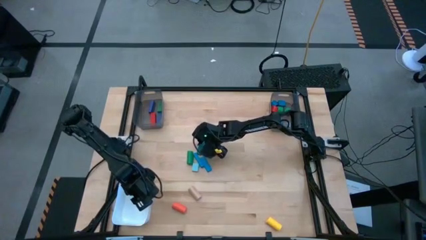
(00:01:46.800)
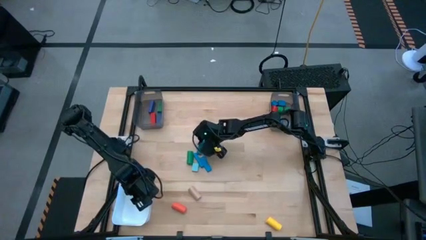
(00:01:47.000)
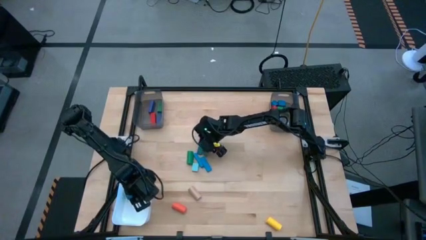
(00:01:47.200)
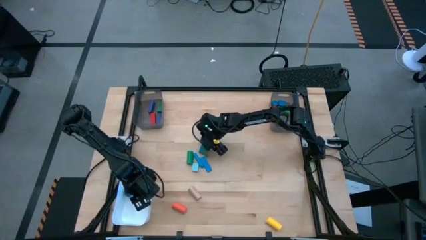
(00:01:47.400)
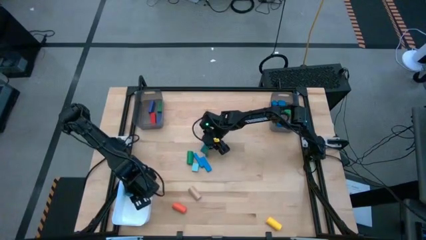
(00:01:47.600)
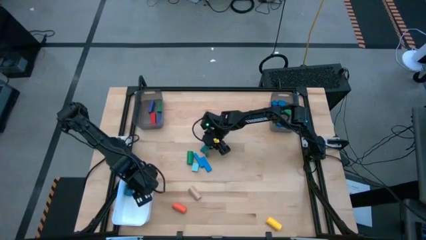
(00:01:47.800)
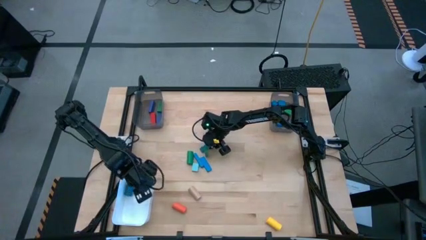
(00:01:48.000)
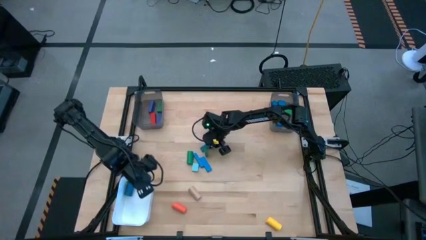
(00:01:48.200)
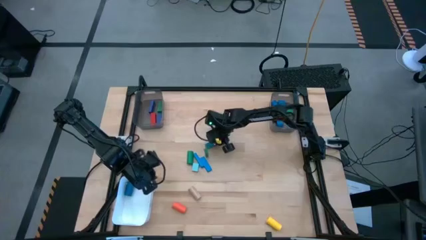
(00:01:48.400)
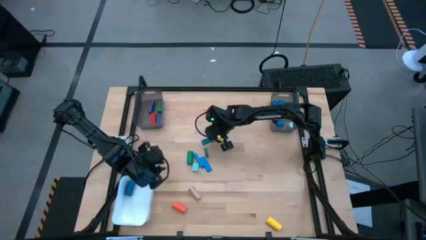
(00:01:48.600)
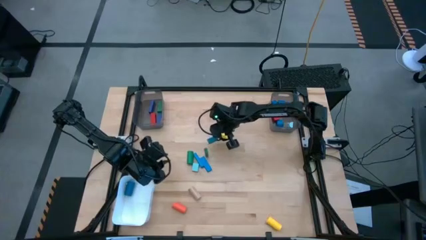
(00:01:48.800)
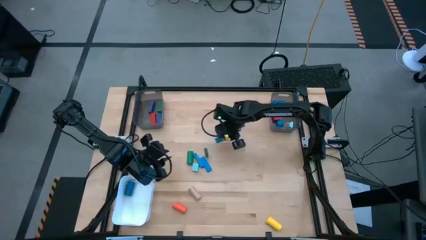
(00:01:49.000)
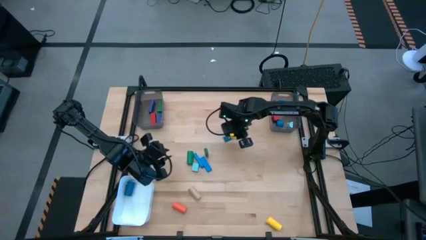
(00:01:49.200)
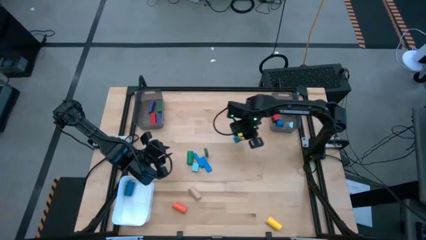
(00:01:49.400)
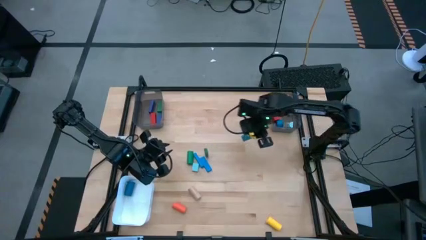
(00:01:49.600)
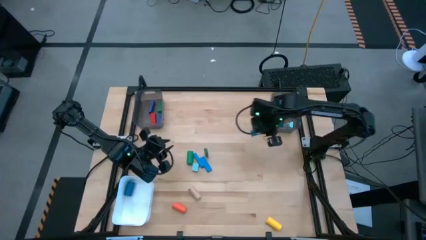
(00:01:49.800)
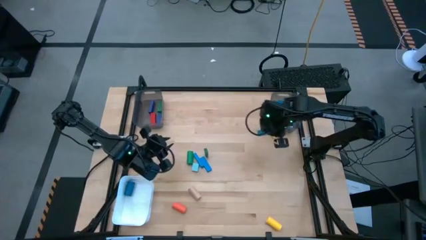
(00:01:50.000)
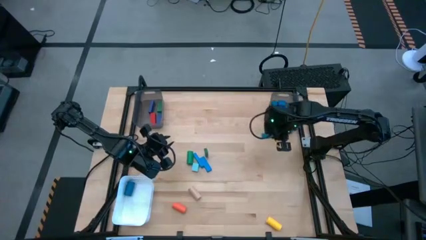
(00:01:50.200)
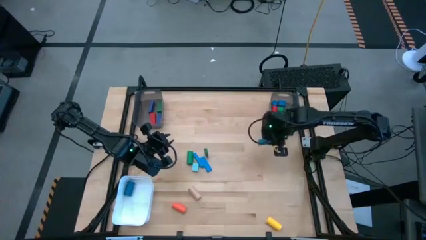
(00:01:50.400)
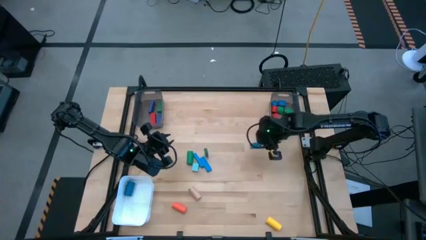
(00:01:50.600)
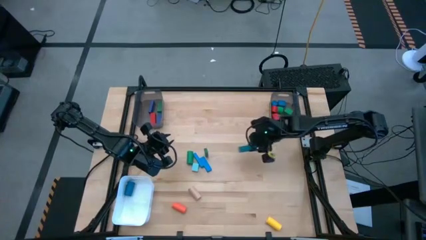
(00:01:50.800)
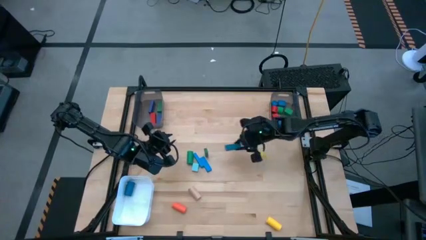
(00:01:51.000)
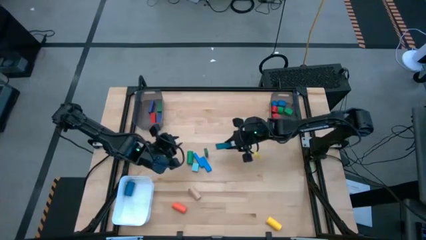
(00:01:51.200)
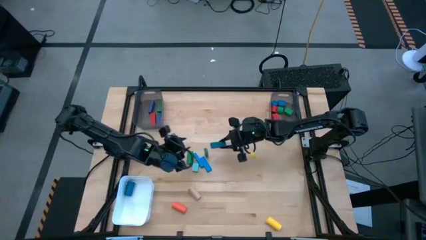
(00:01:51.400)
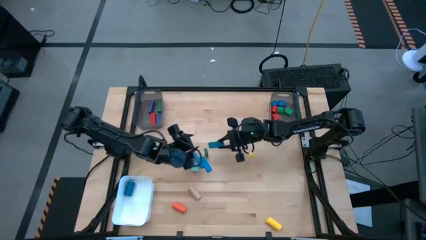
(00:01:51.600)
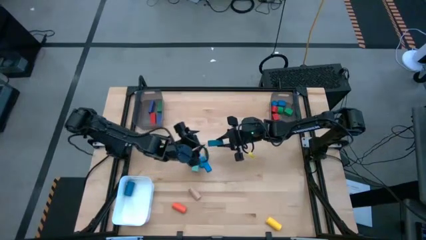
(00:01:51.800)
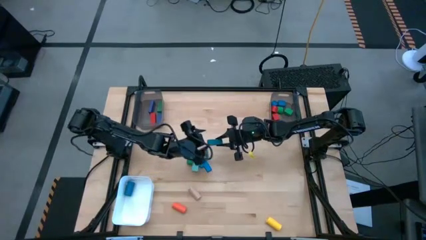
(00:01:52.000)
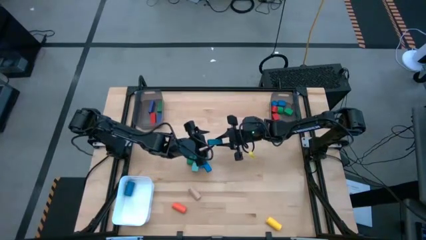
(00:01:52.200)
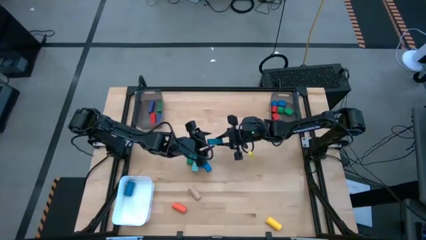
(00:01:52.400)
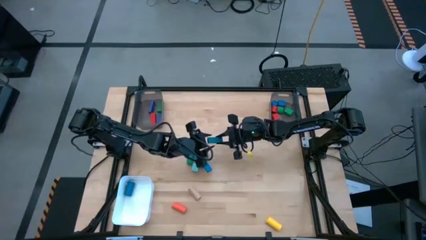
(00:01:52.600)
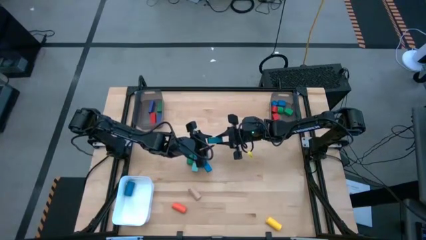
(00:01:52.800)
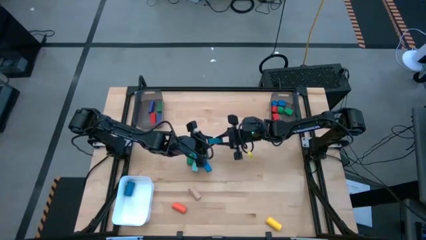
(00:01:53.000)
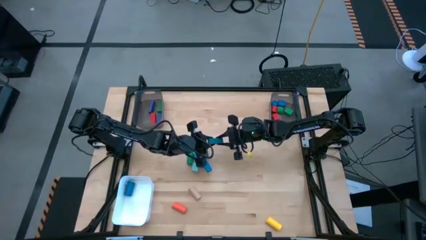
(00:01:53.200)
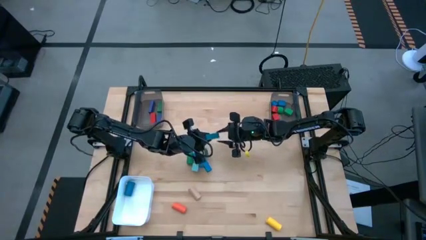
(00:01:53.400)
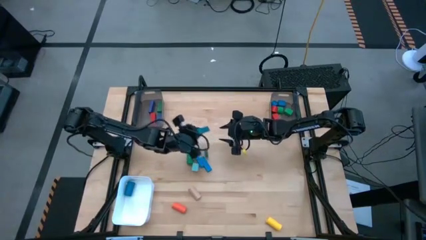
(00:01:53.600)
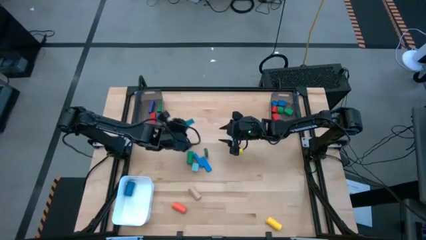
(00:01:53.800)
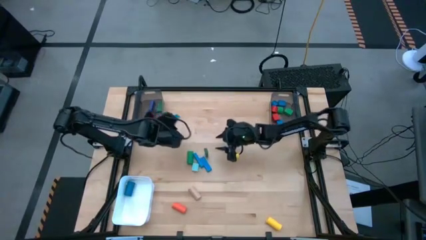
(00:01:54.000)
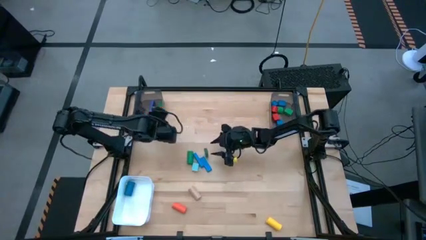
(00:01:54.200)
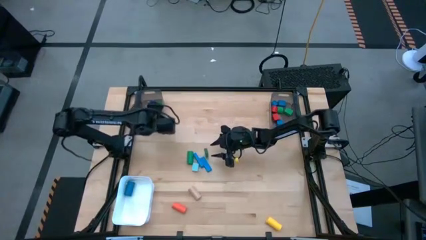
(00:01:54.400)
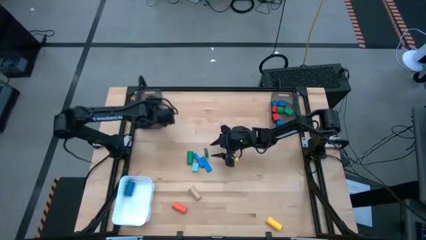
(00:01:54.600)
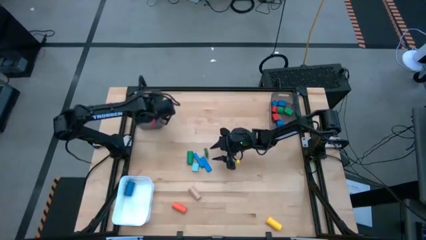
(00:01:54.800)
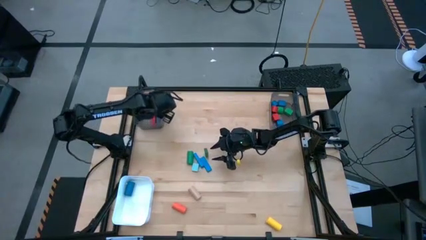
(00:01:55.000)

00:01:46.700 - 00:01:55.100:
Task: Sort blocks by size
Put the dark blue rectangular block into the left black bin

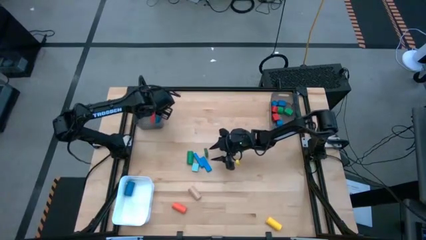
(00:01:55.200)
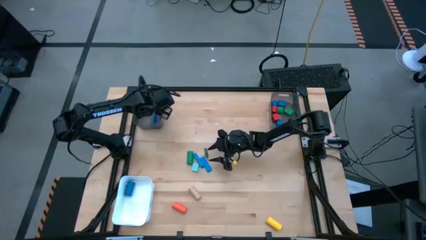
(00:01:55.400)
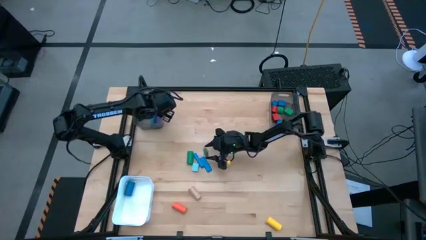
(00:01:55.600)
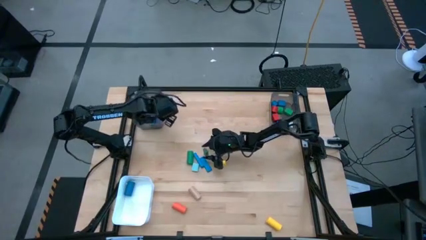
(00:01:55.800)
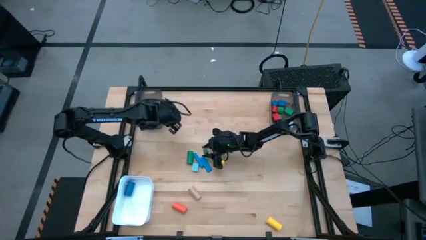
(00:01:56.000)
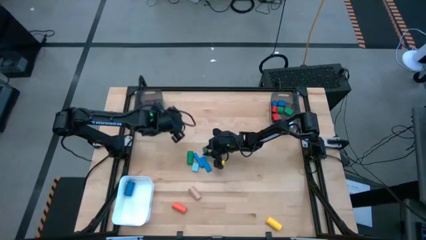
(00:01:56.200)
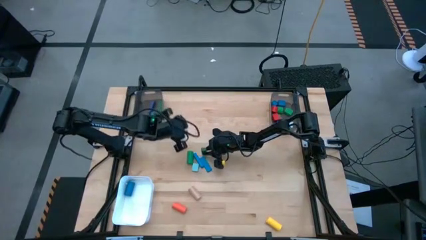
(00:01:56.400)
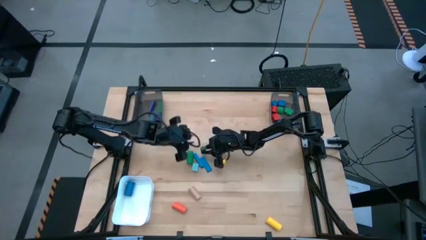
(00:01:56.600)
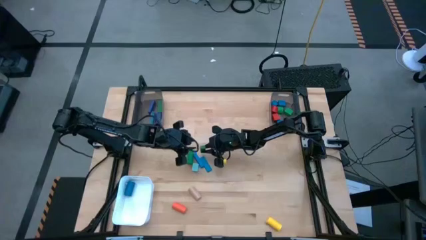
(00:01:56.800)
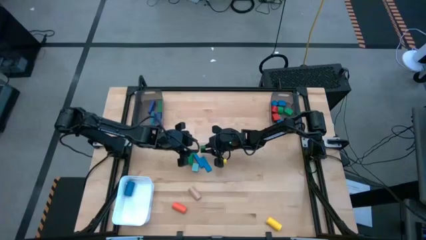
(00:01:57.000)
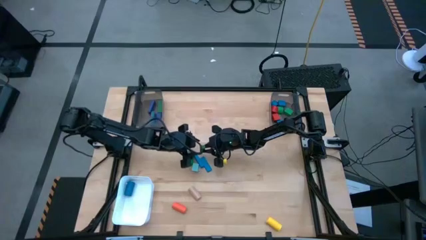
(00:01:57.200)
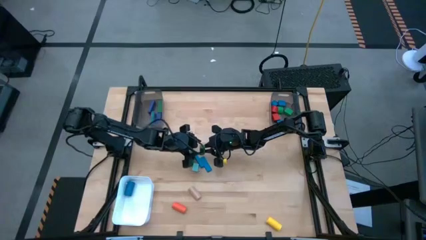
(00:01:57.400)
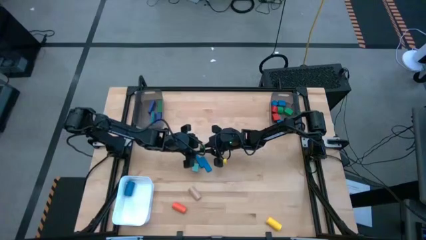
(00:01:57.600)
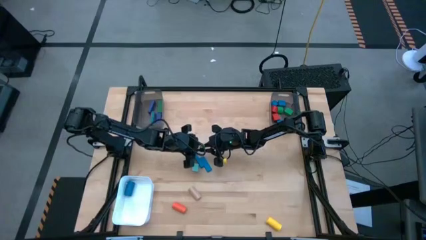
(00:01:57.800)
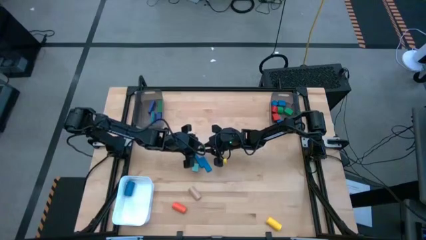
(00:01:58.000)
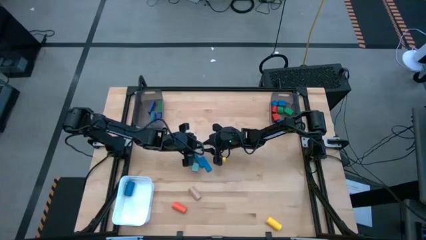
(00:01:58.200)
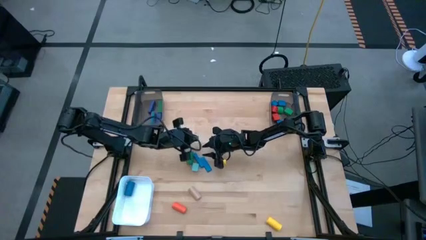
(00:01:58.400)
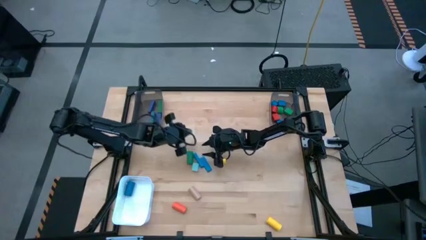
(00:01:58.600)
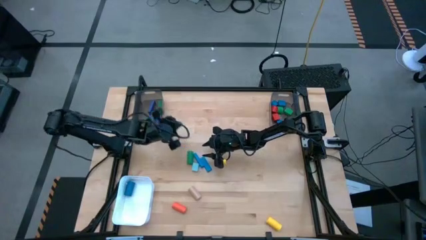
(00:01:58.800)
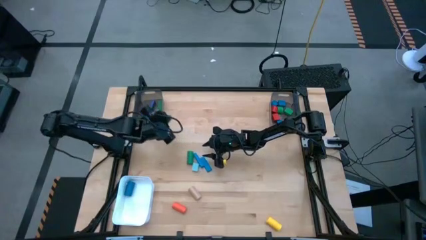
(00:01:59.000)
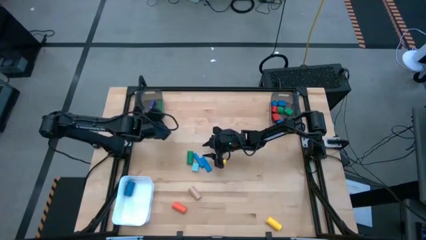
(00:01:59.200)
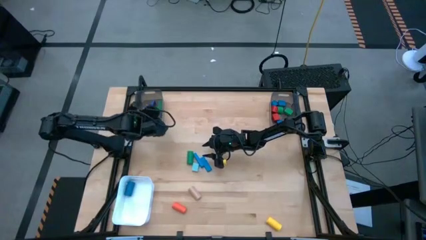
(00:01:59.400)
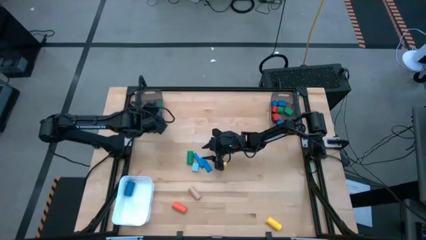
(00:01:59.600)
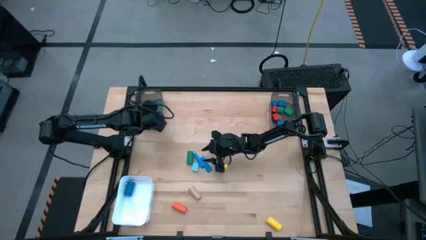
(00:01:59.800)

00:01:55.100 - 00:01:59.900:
Put the green rectangular block into the left black bin

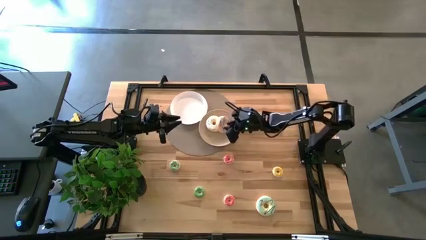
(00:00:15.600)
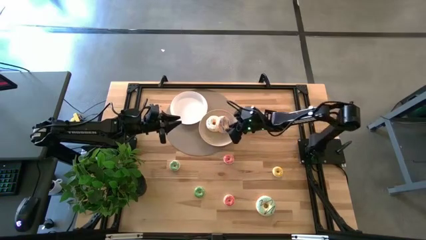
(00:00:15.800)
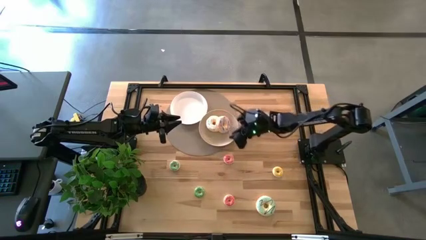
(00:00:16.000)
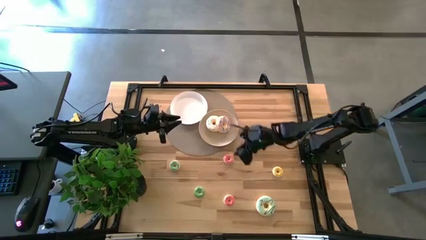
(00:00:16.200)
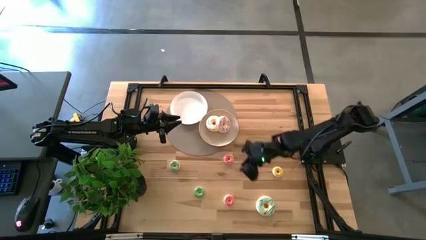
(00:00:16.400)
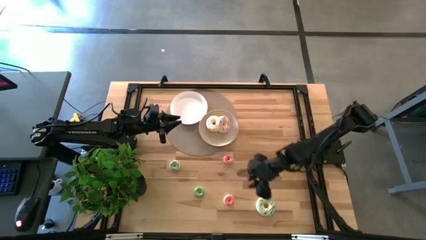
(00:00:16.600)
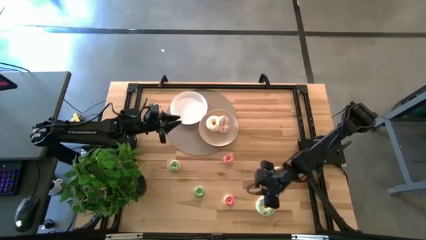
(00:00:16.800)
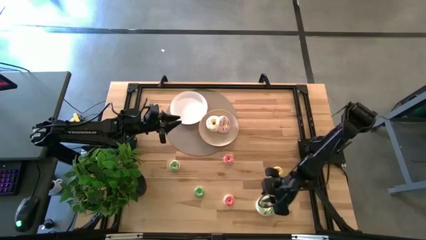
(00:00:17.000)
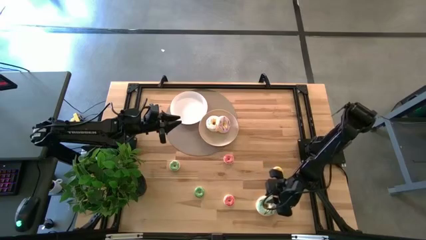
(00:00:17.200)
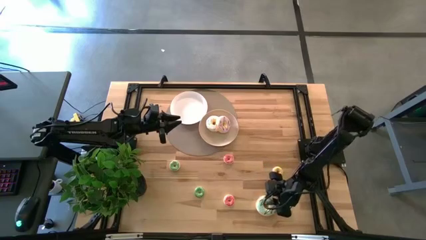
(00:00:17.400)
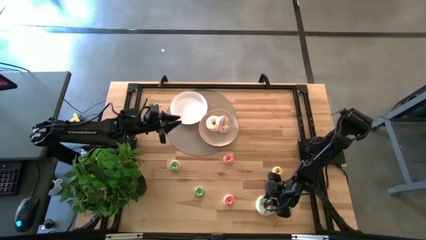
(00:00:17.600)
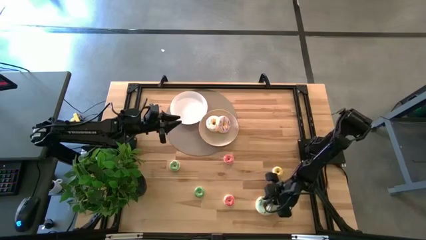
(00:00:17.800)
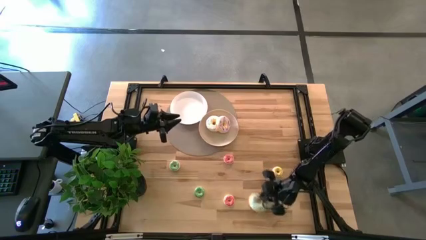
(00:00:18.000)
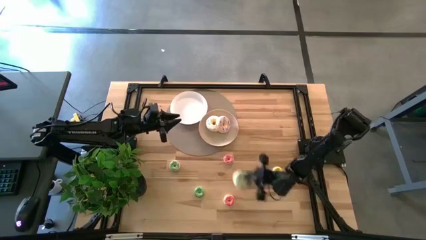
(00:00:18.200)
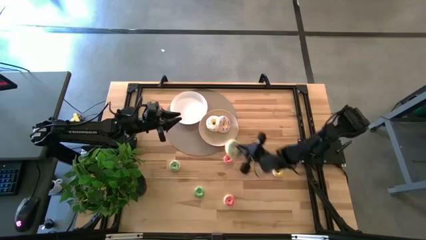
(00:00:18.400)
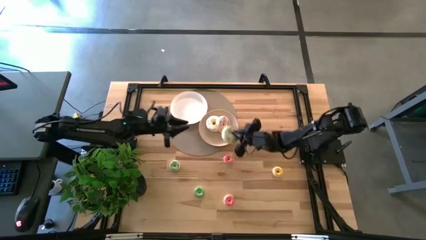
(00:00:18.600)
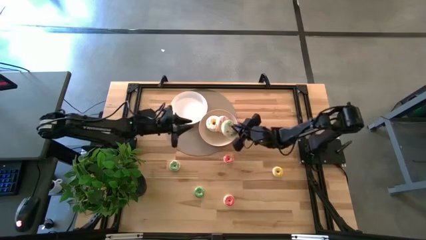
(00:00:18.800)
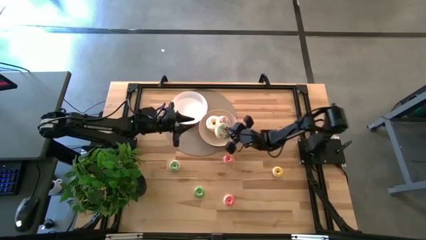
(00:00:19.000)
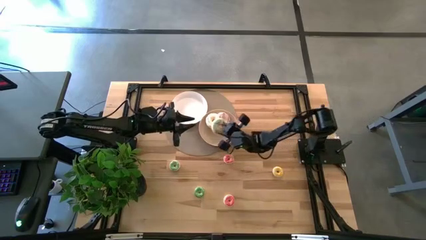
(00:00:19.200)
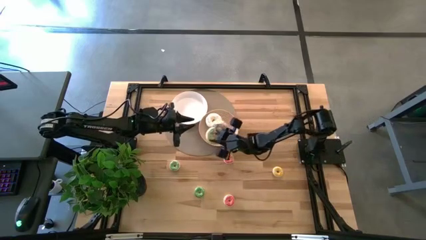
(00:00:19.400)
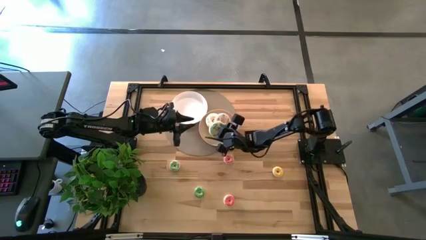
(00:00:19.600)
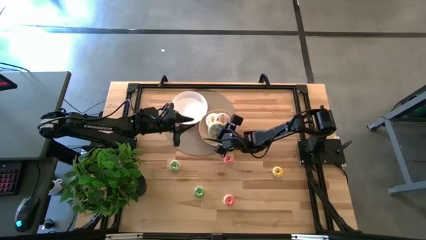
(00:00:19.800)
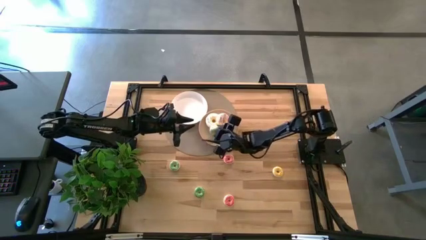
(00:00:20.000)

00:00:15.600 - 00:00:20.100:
Task: Pick & Place donuts
Put the large light blue doughnut on the brown plate
